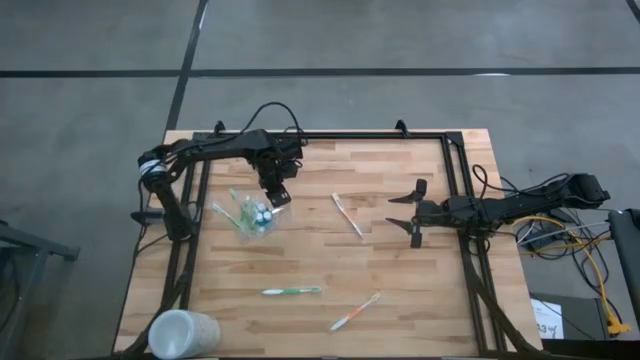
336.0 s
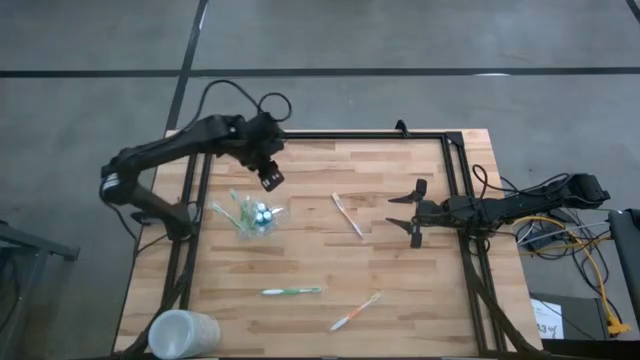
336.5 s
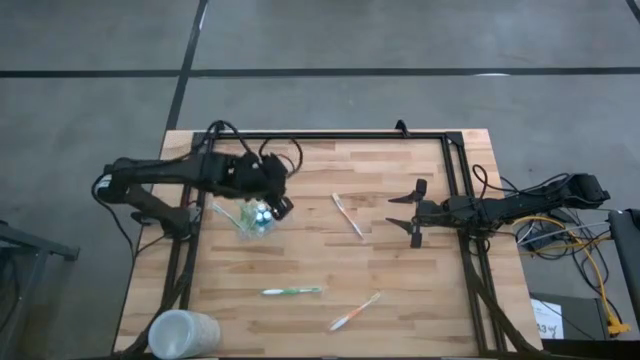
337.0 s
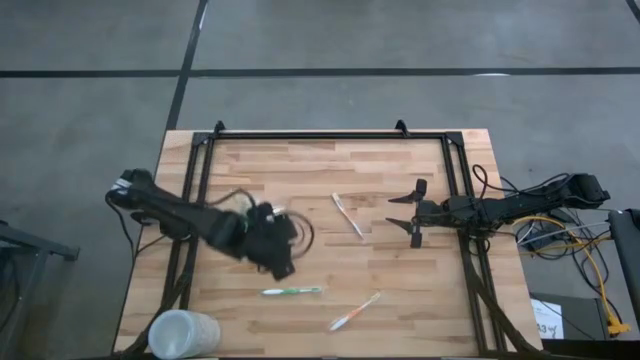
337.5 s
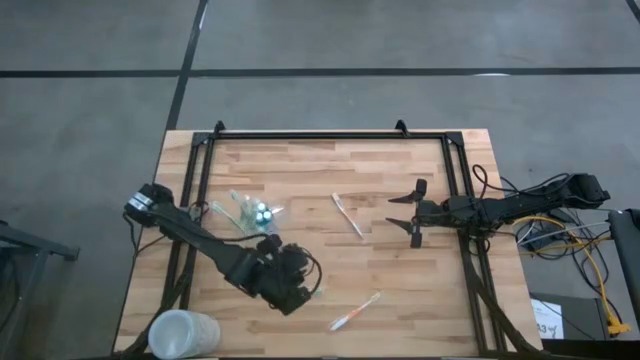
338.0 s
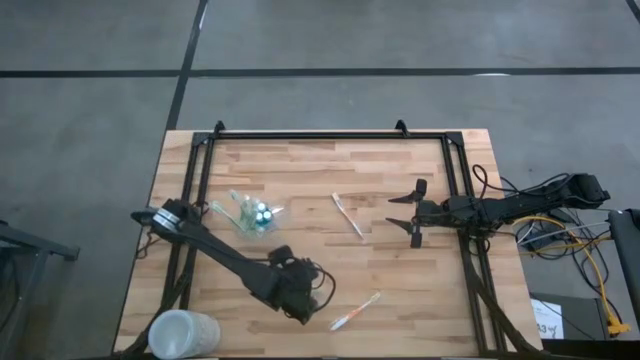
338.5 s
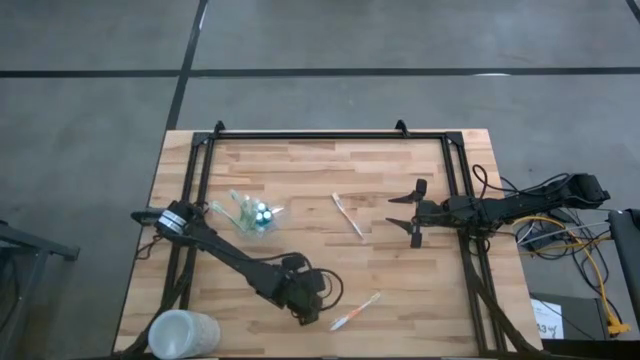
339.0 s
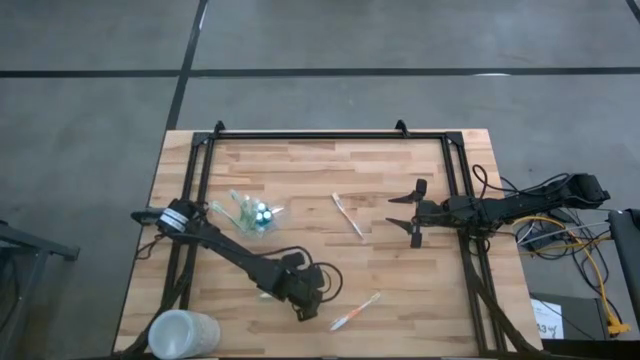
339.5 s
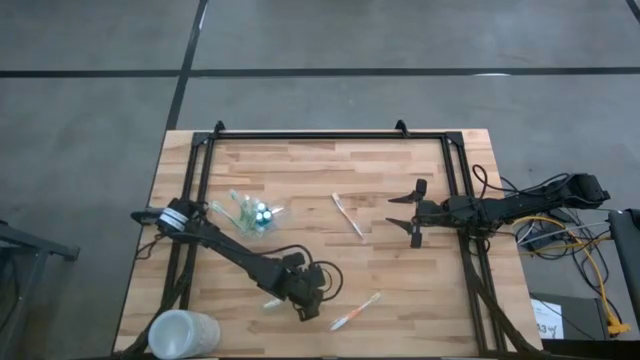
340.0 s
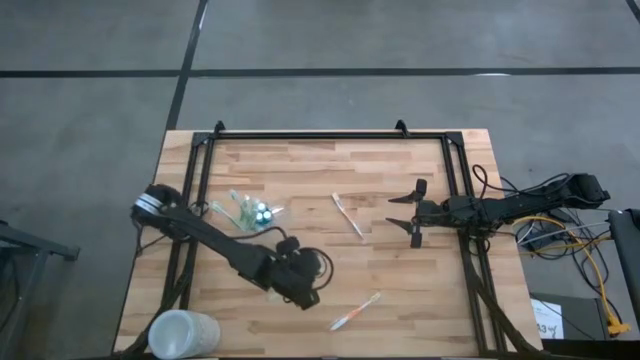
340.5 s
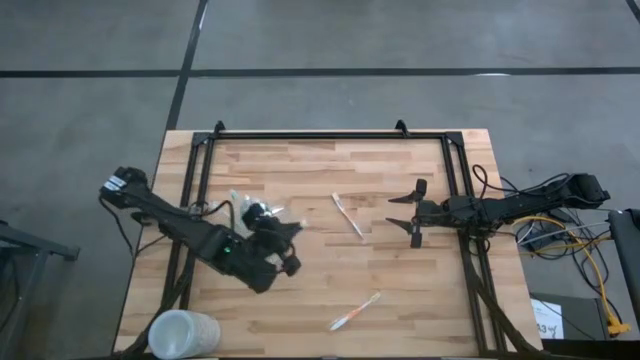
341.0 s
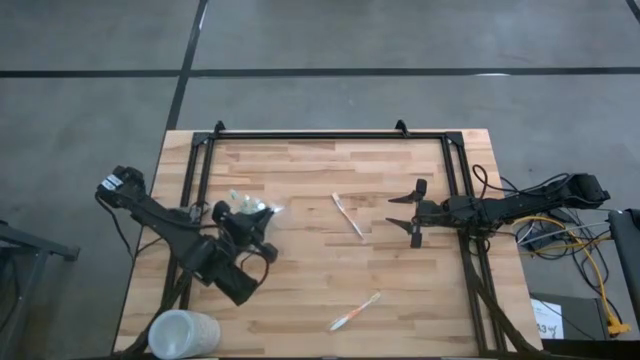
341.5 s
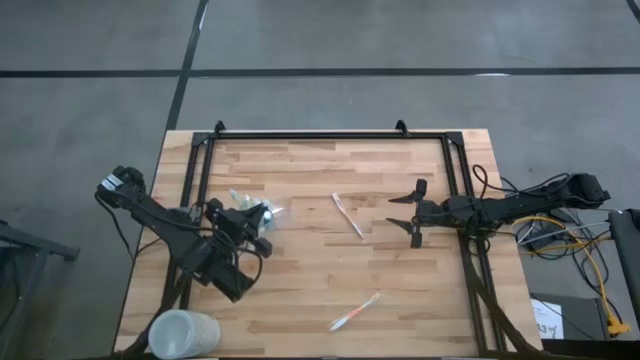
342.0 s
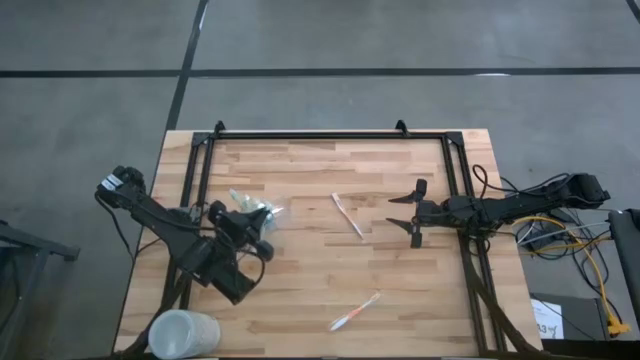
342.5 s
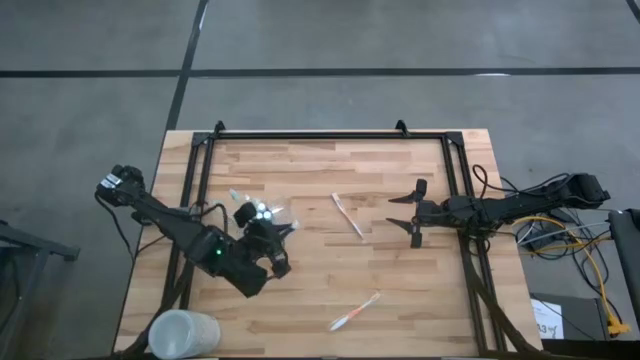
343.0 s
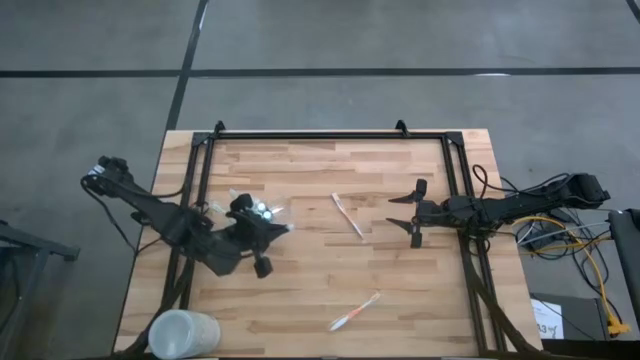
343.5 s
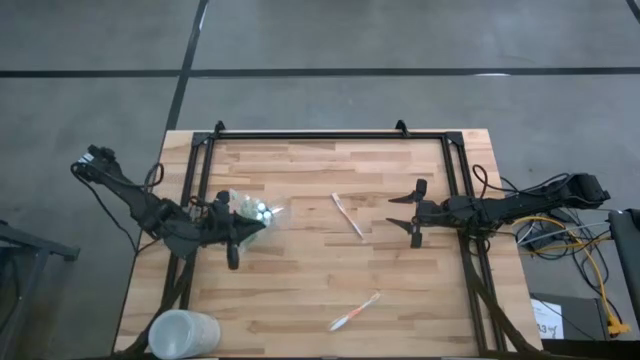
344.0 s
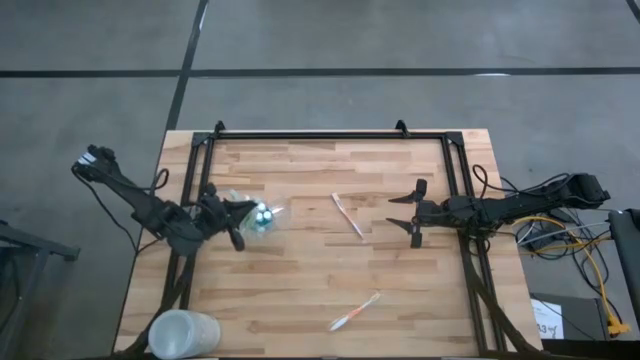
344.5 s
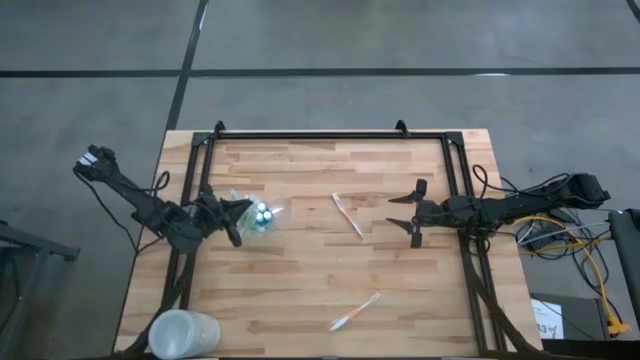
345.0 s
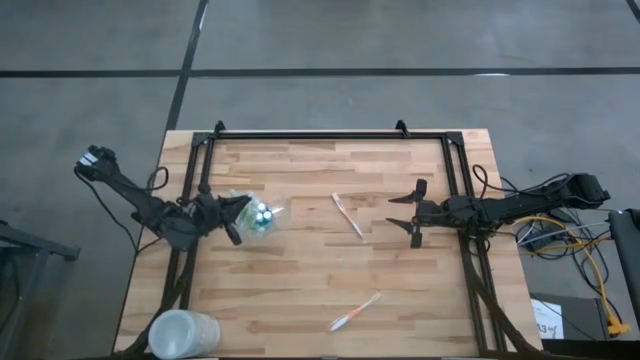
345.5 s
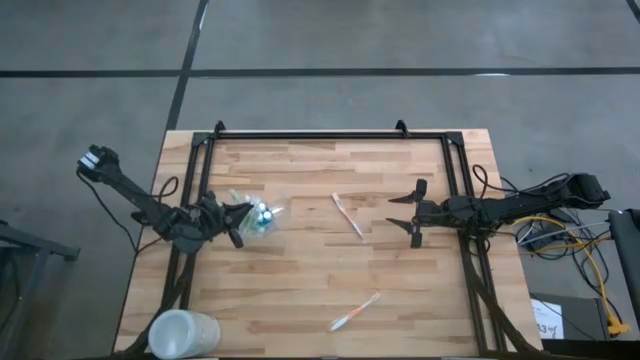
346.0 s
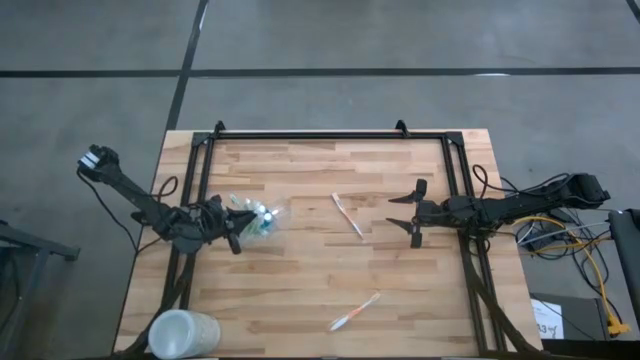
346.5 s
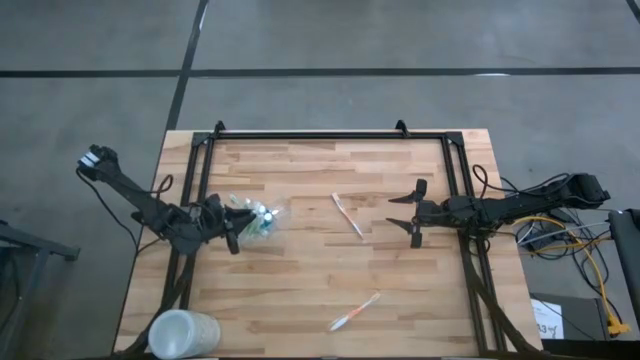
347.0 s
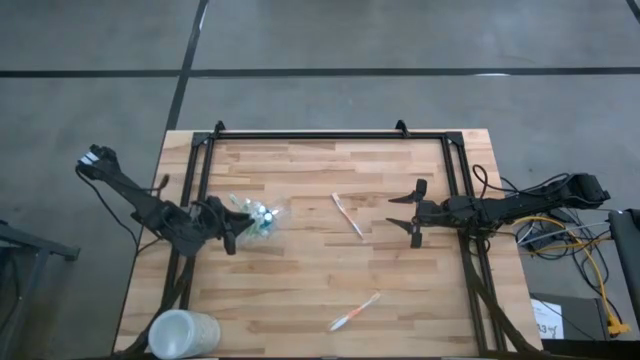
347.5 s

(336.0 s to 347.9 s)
Task: Pick & Place toothbrushing station
Put the green toothbrush into the transparent organizer

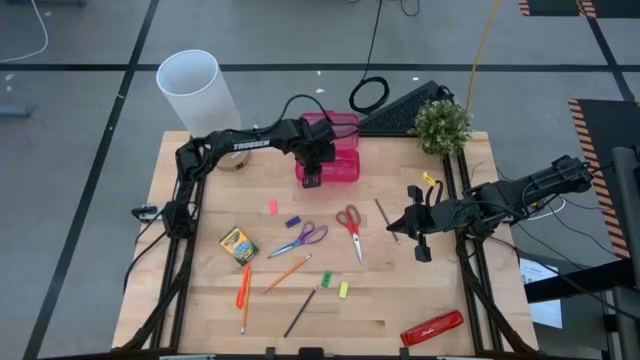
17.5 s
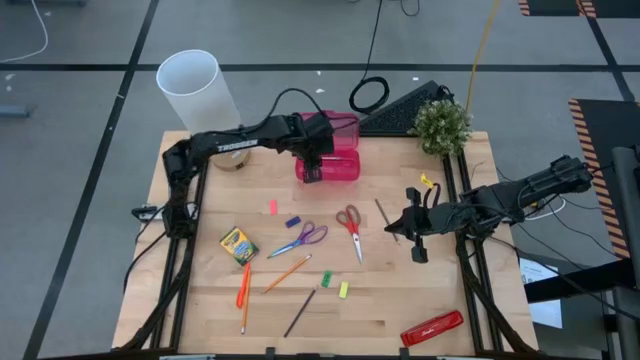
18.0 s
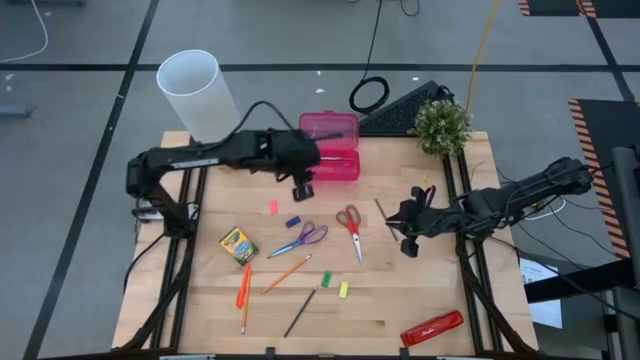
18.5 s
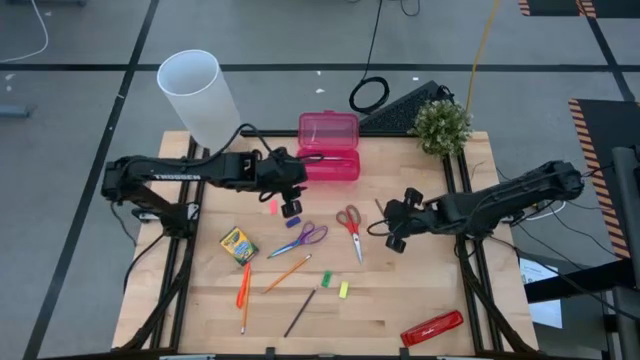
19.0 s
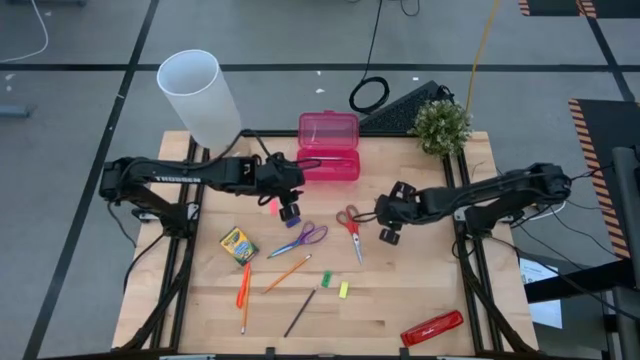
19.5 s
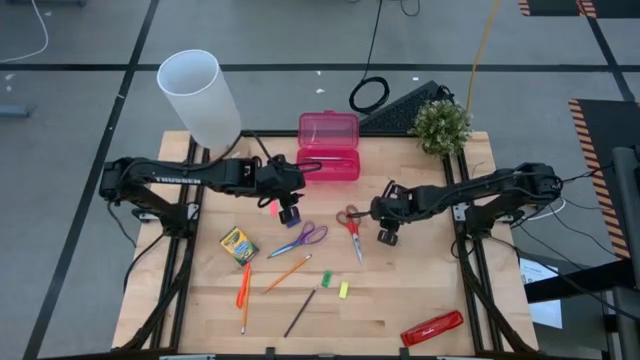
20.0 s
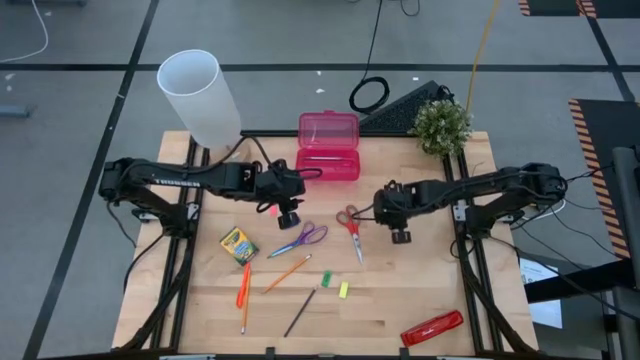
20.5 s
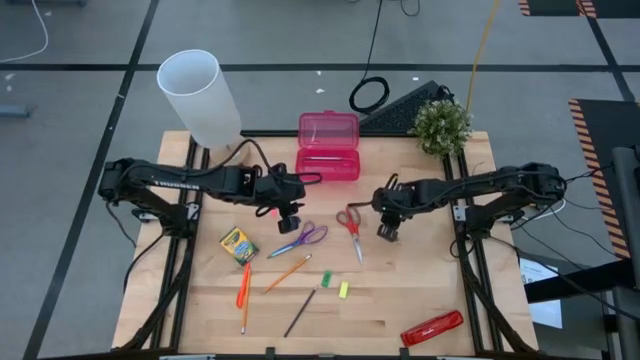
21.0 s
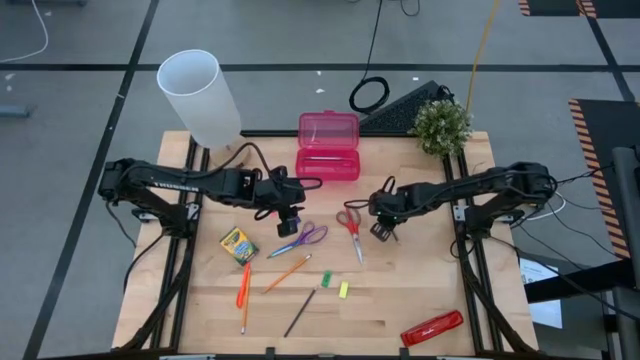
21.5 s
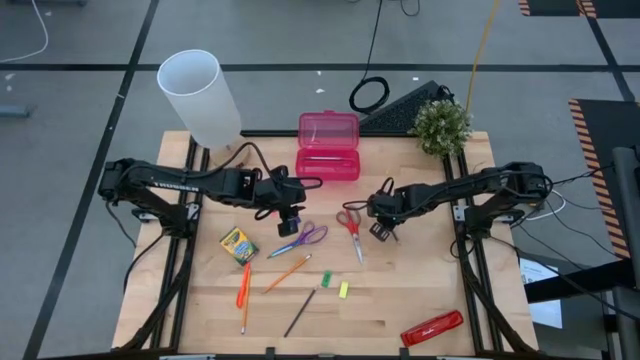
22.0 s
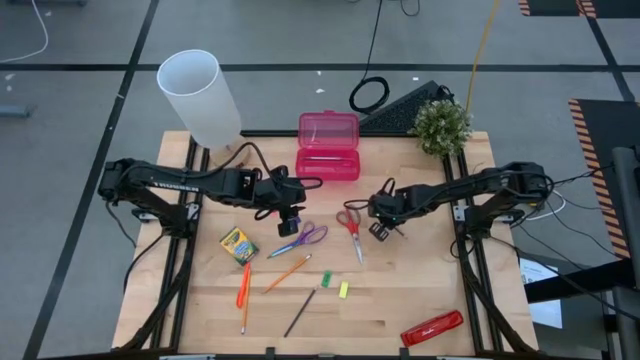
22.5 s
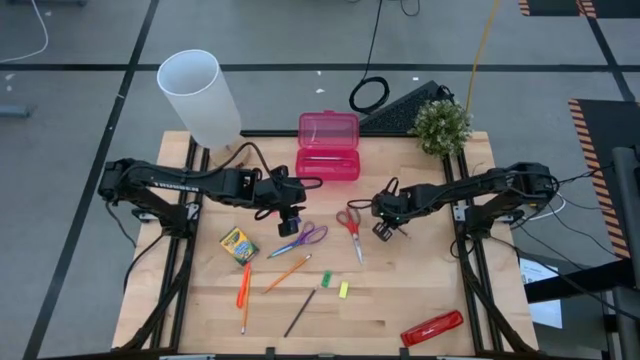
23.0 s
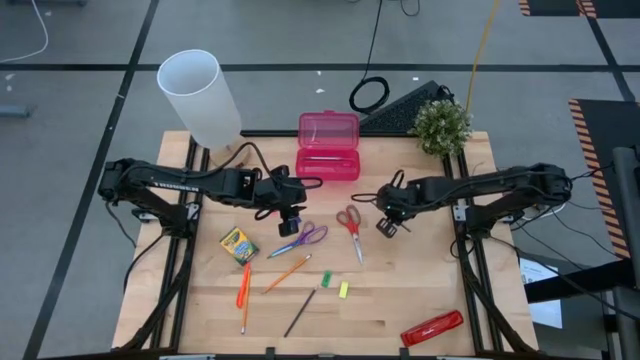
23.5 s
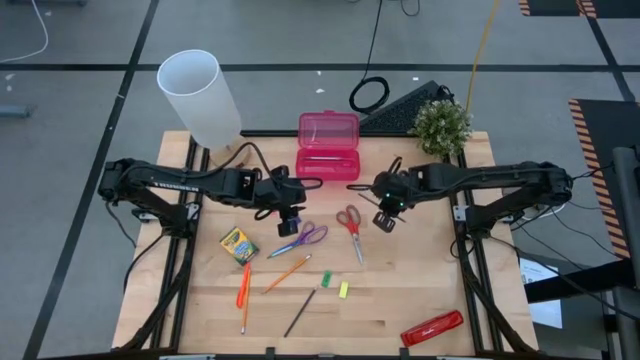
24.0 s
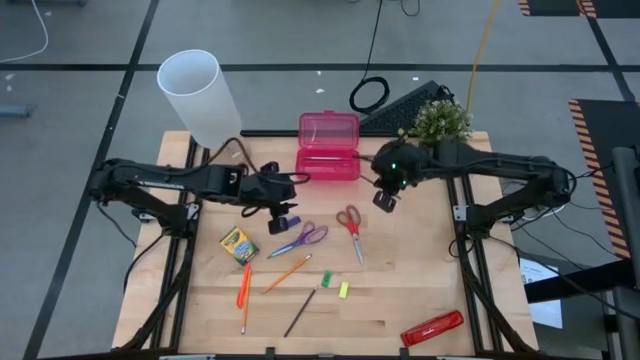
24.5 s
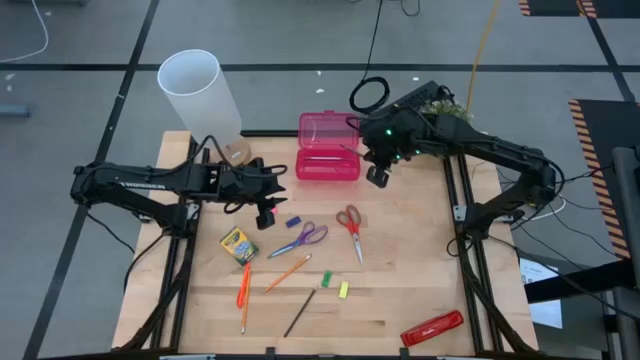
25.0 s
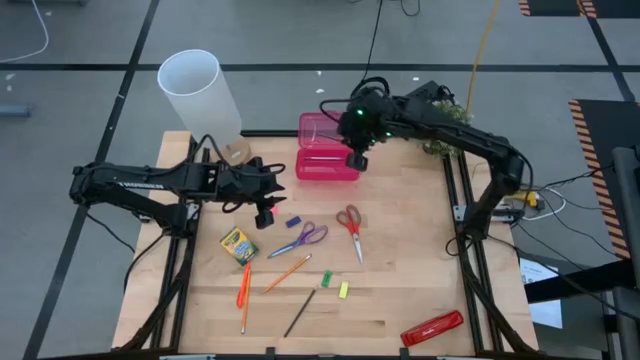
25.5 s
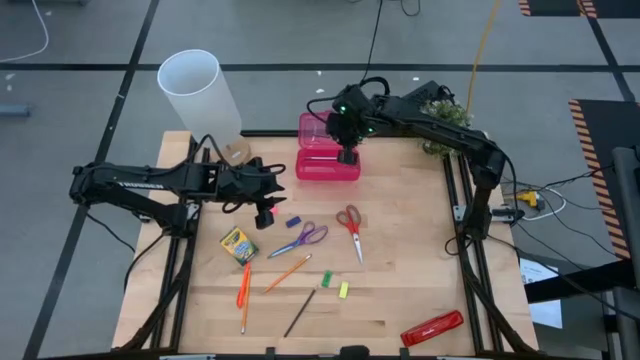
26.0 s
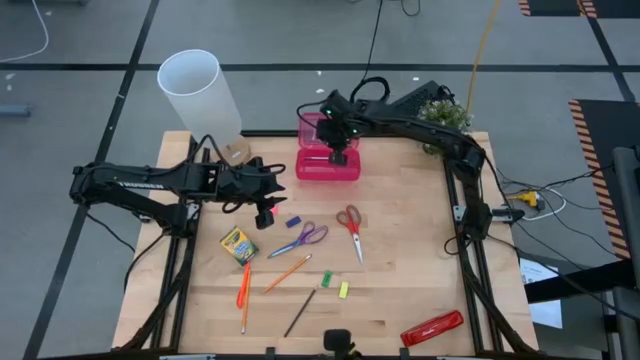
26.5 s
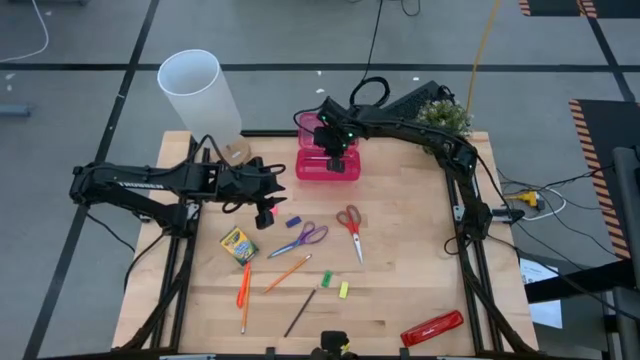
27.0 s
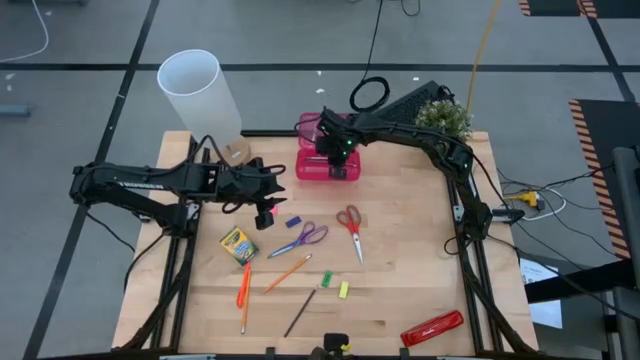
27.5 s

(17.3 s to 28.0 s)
Task: Pack school essentials
Put the top black pencil into the red supply box
